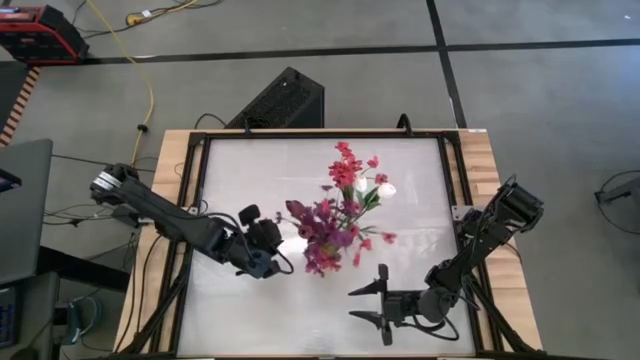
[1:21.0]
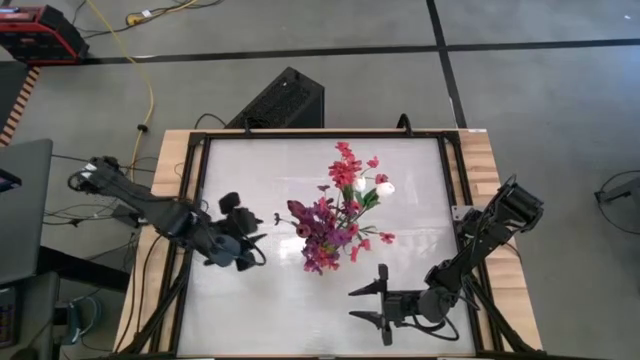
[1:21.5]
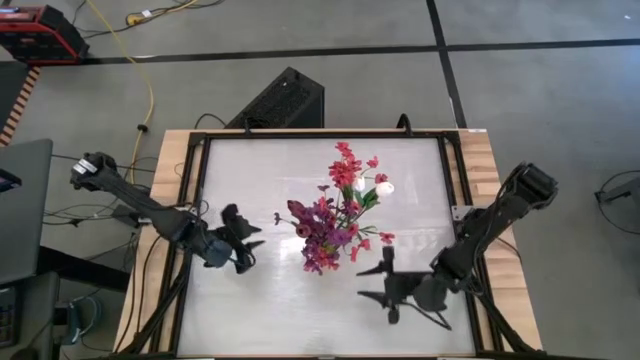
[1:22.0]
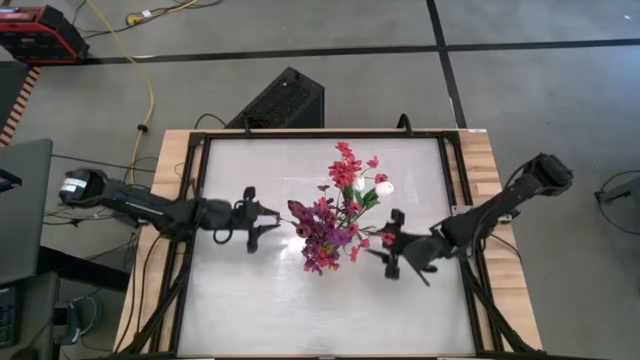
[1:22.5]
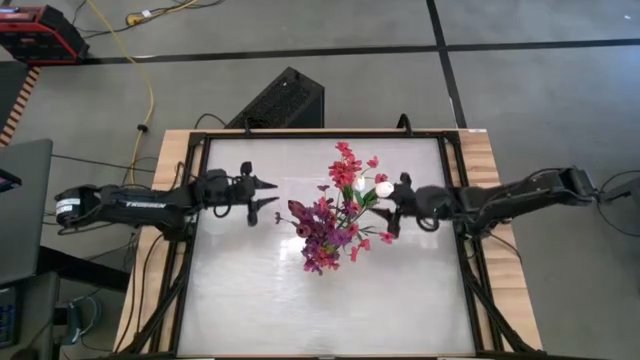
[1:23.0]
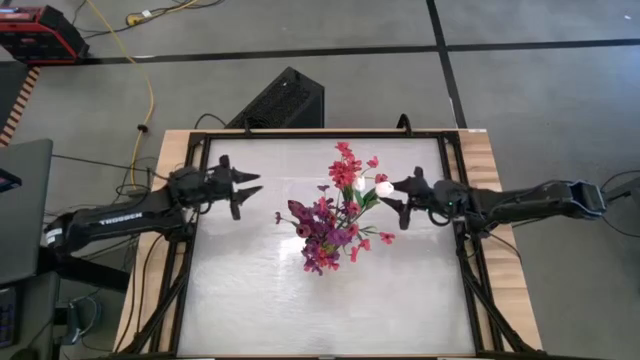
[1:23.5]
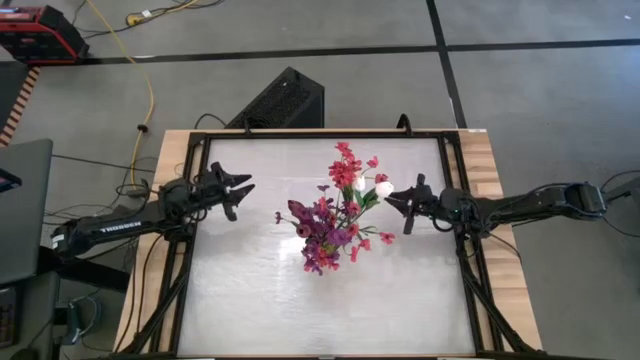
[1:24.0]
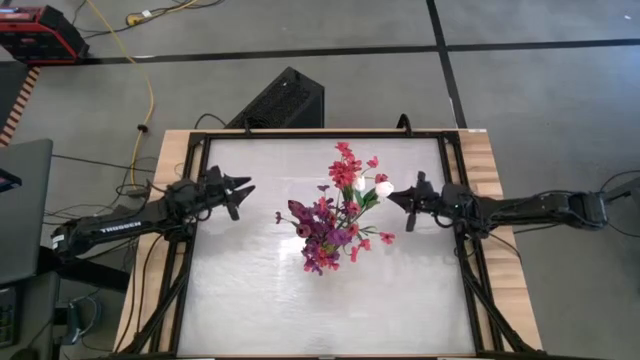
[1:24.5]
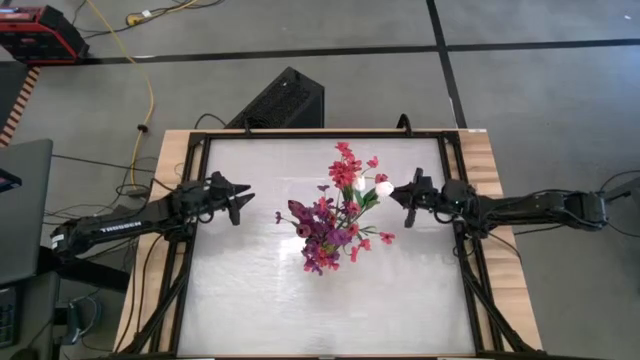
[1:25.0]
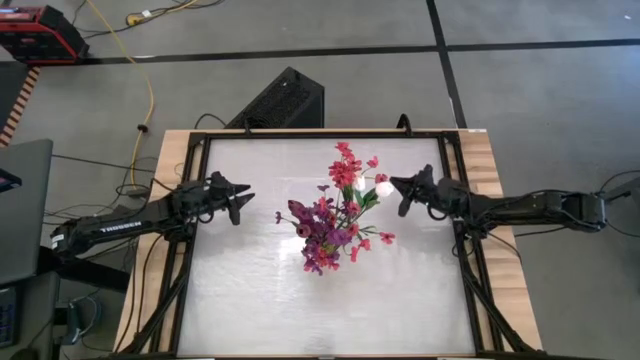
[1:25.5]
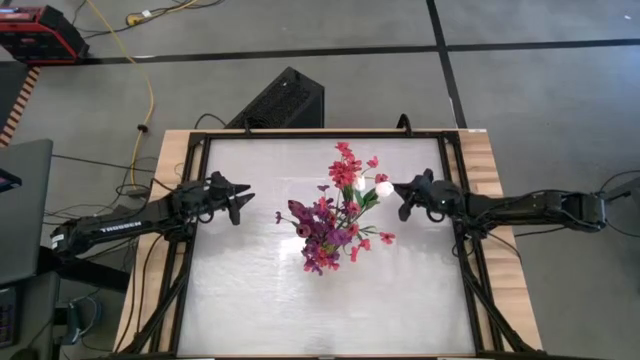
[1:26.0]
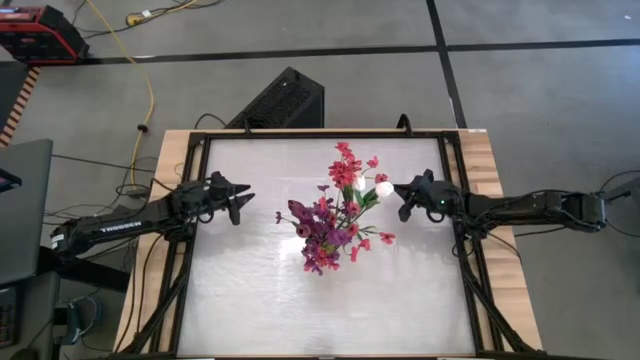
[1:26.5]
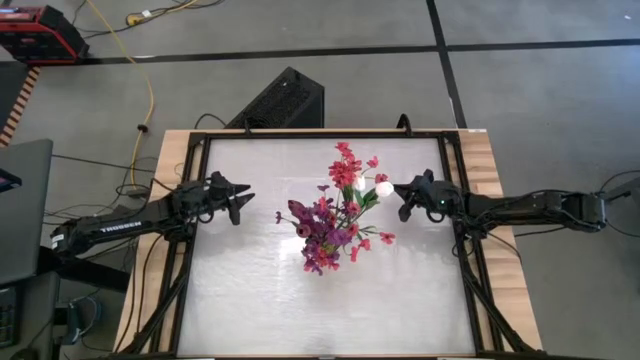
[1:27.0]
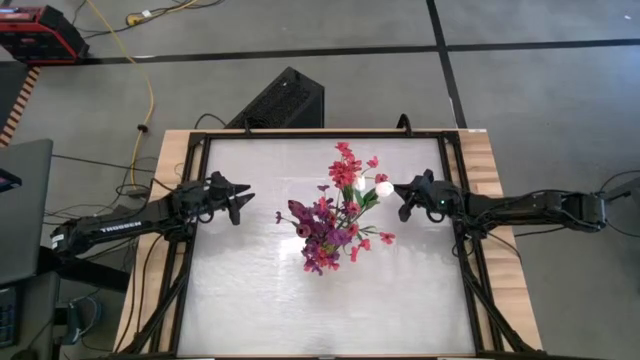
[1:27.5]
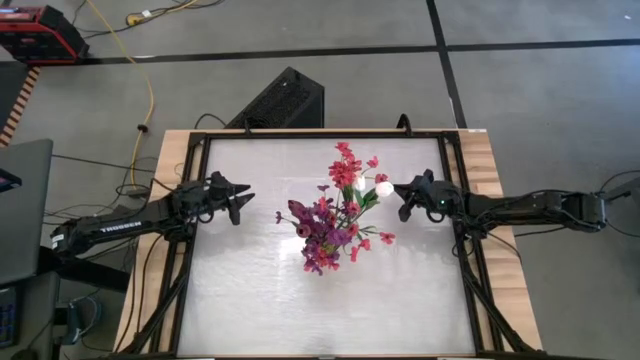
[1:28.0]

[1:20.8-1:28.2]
Task: Sort flowers into vase by color
Return to Home Position

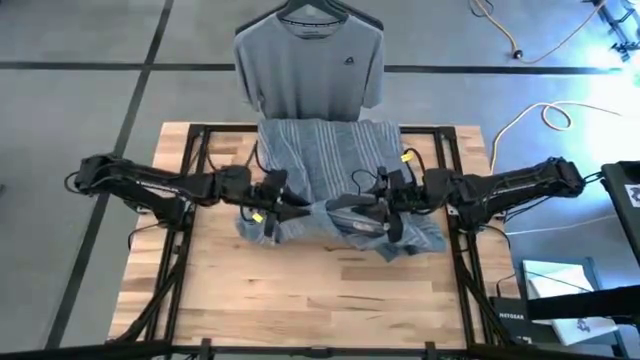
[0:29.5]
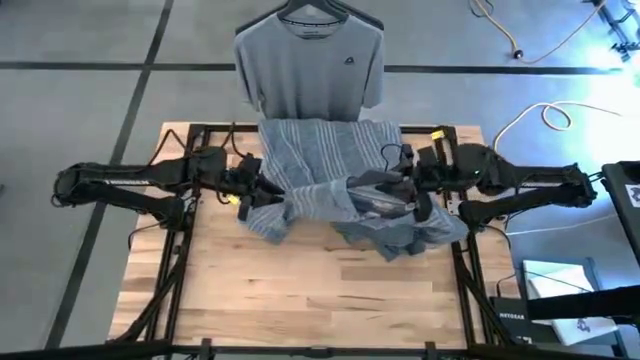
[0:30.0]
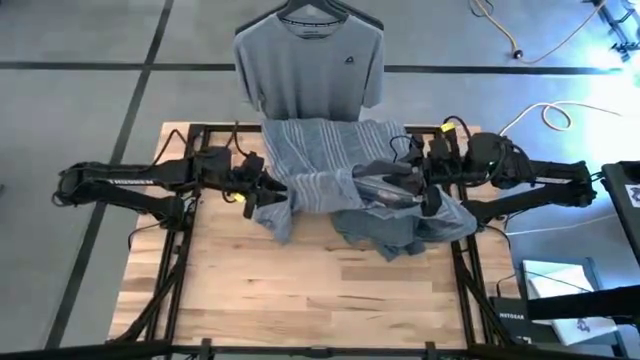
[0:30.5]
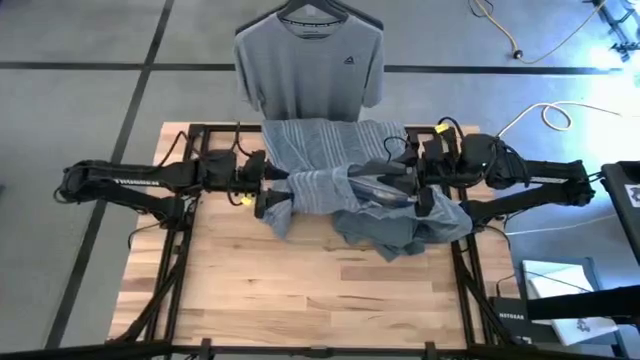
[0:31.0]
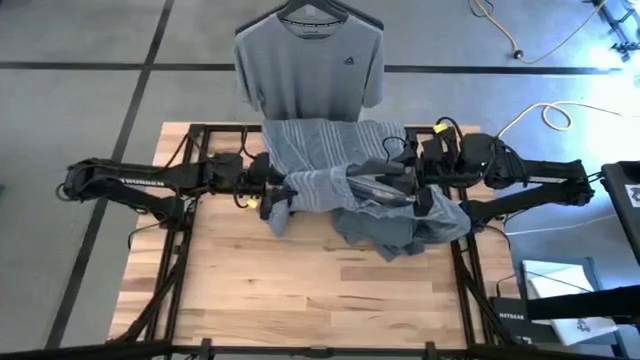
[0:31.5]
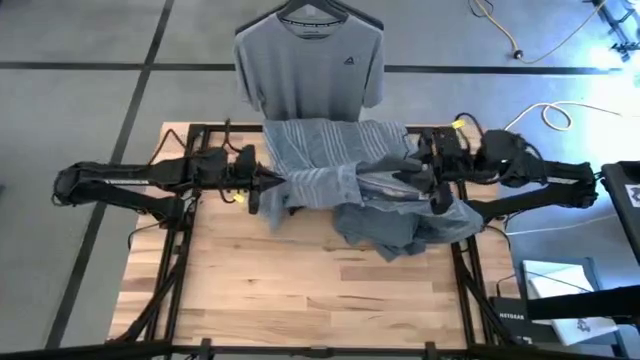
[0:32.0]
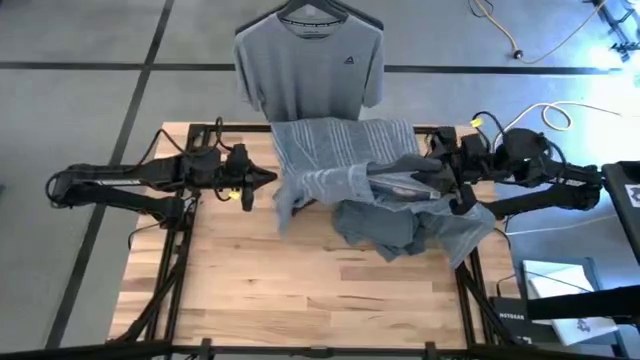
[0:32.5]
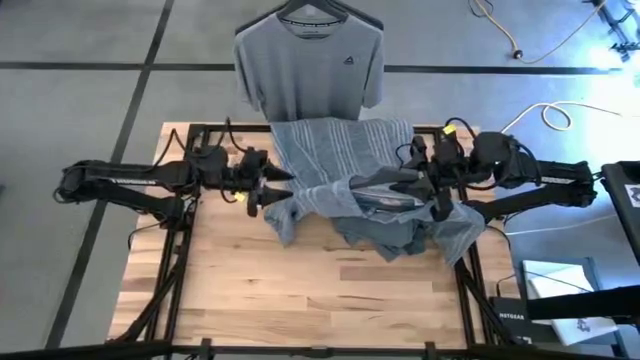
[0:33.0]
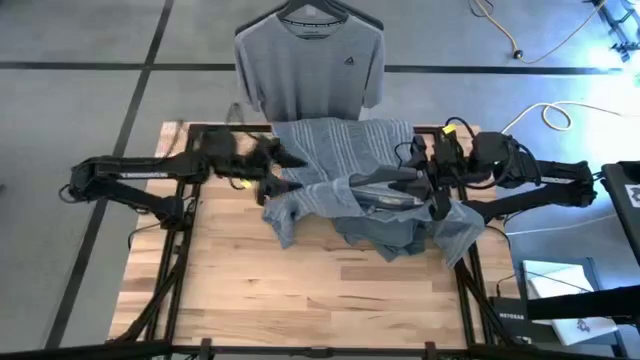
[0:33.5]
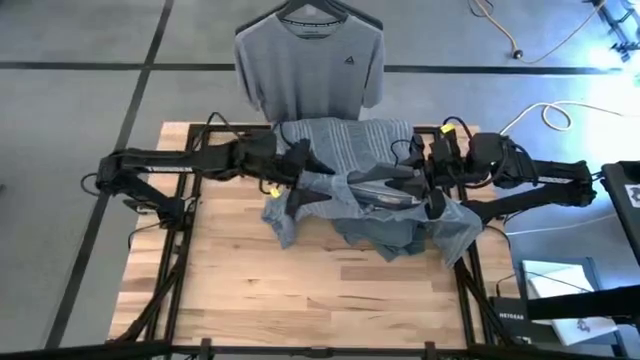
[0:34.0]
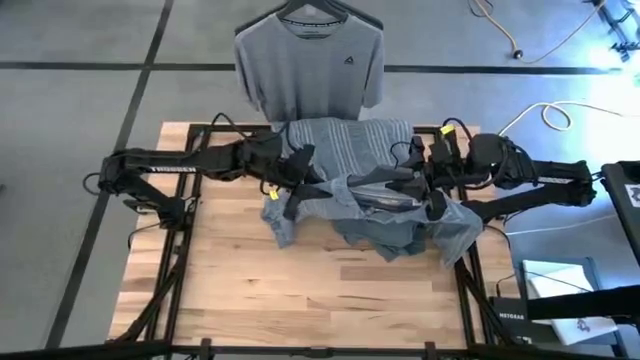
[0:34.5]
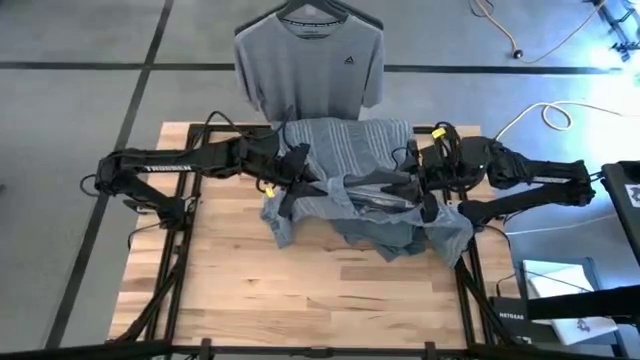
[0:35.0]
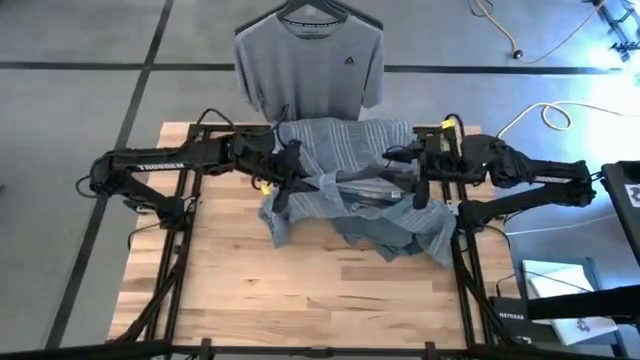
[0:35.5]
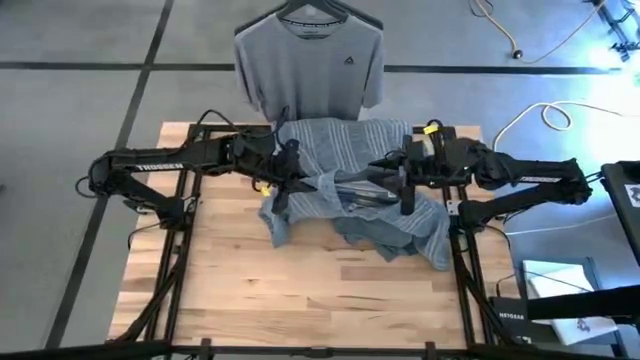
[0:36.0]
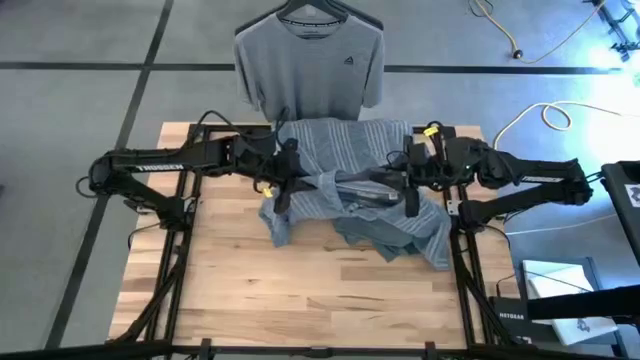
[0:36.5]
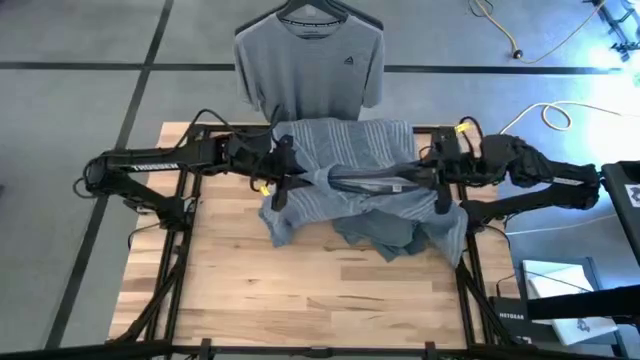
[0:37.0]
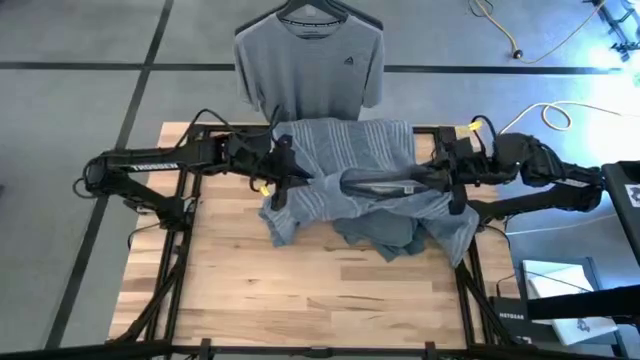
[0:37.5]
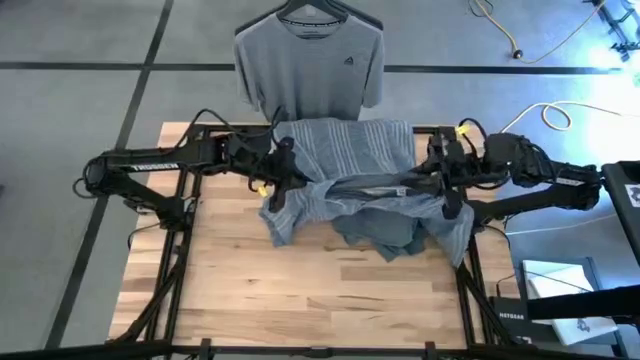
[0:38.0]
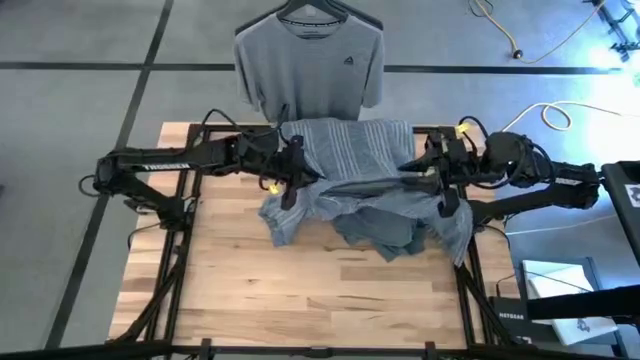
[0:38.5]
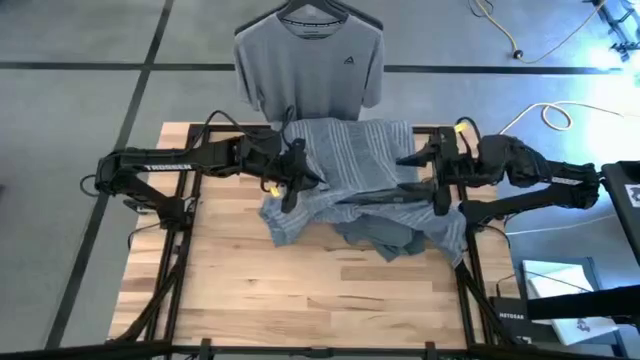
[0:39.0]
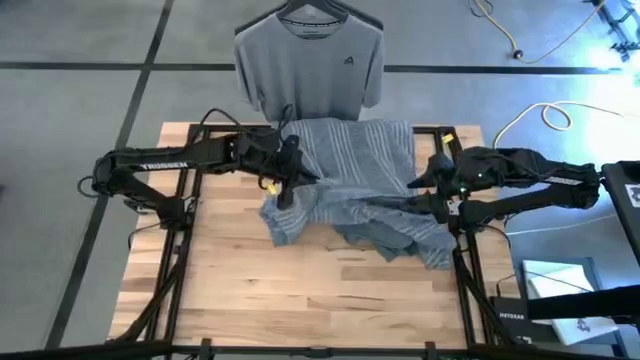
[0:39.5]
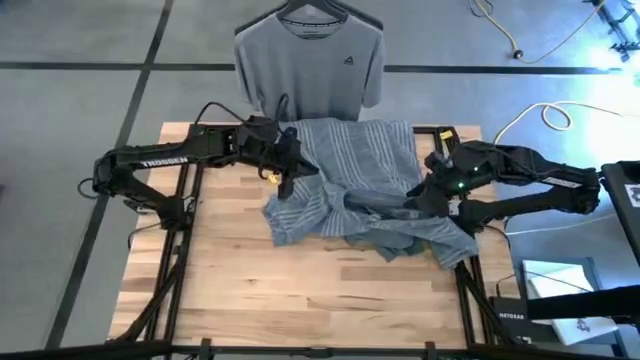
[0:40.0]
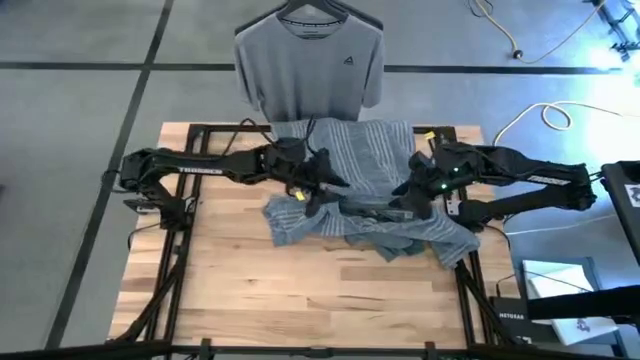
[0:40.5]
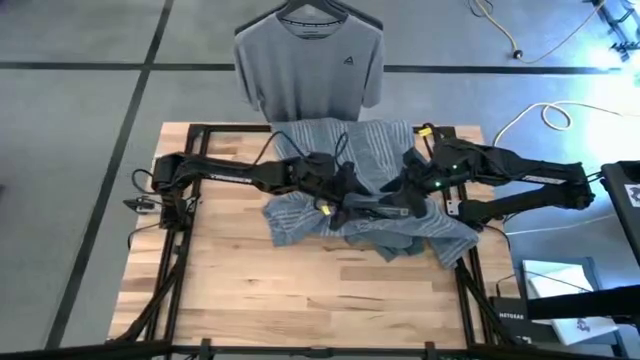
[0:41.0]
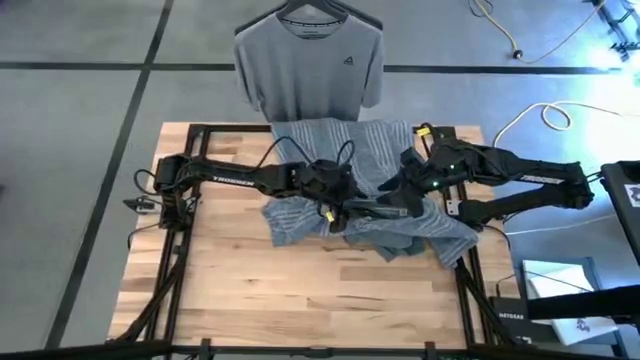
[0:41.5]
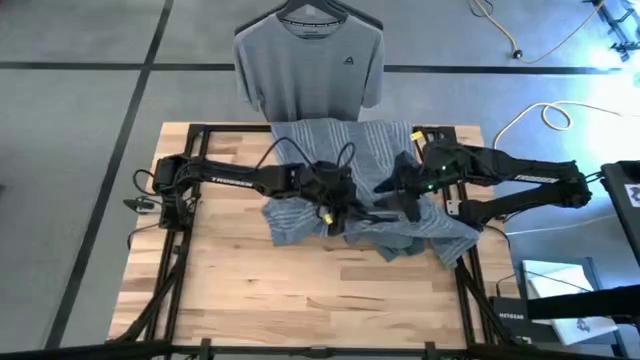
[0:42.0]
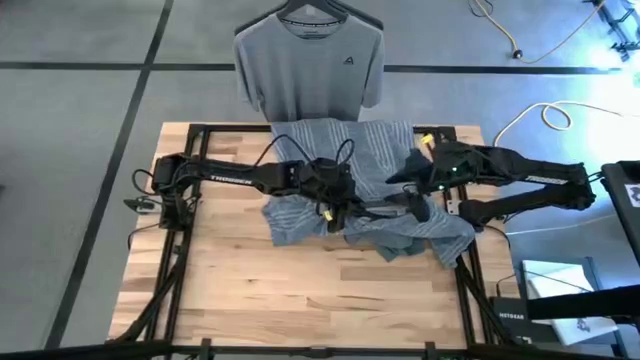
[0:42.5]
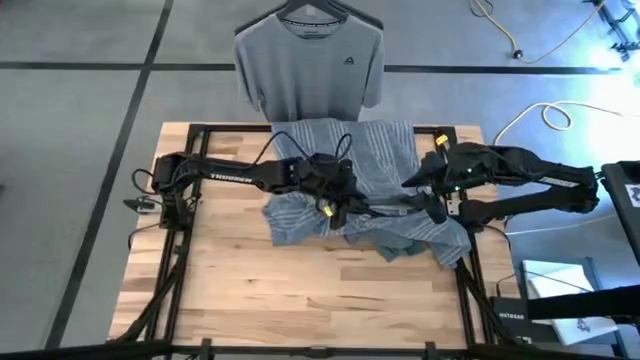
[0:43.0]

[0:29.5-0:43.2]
Task: Unhang clothes
Remove the polo shirt from the hanger
